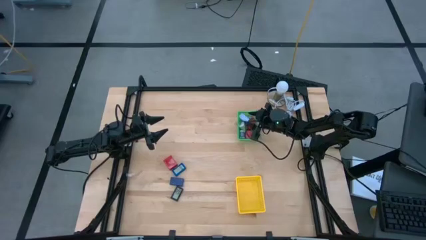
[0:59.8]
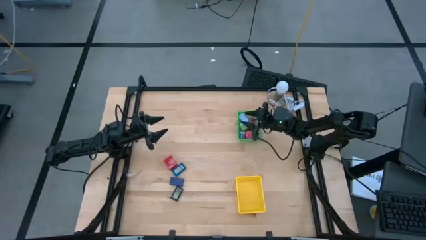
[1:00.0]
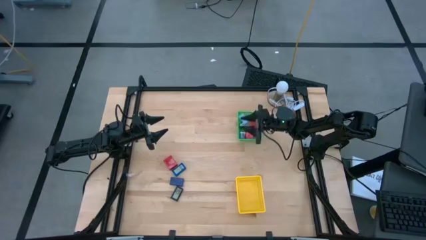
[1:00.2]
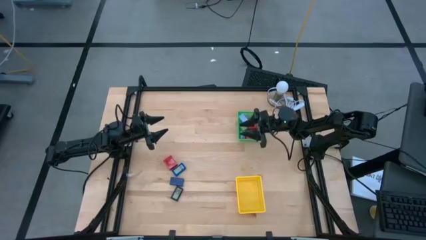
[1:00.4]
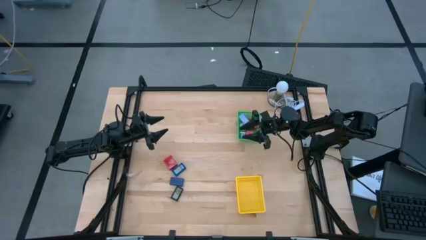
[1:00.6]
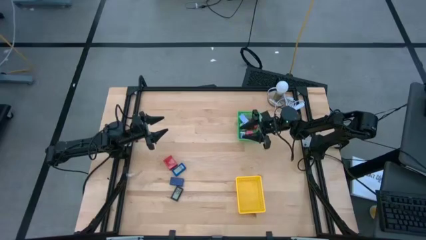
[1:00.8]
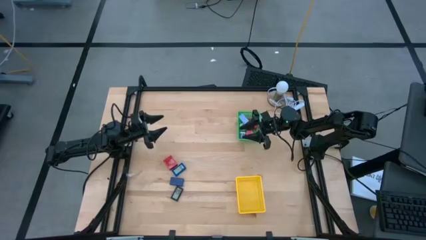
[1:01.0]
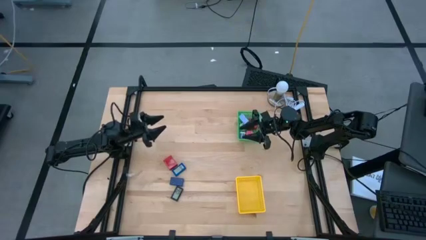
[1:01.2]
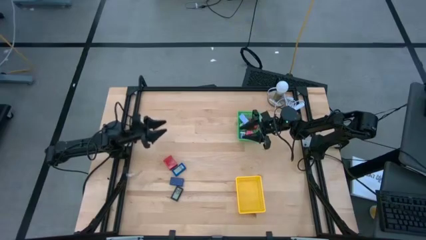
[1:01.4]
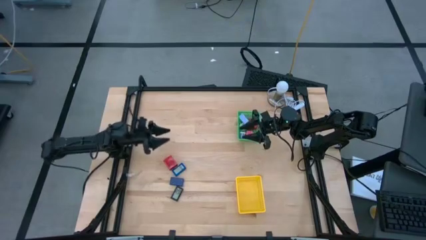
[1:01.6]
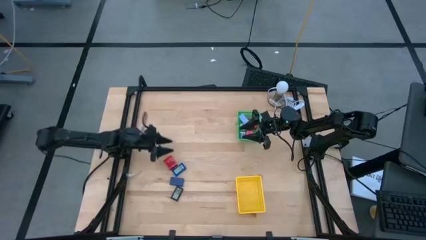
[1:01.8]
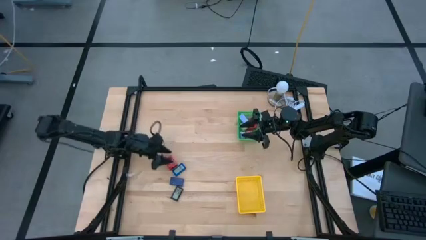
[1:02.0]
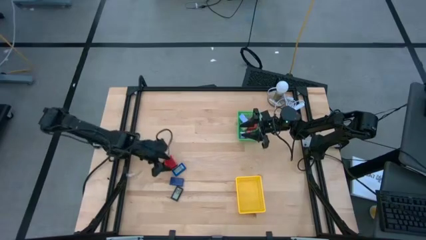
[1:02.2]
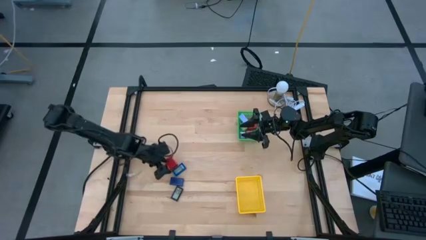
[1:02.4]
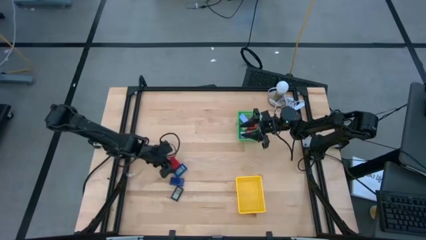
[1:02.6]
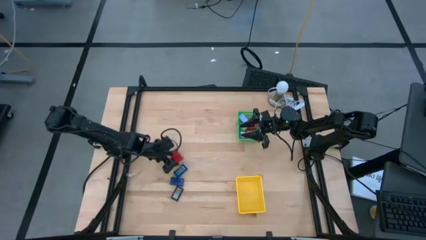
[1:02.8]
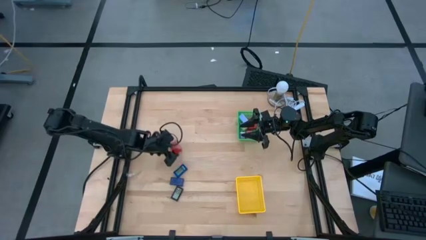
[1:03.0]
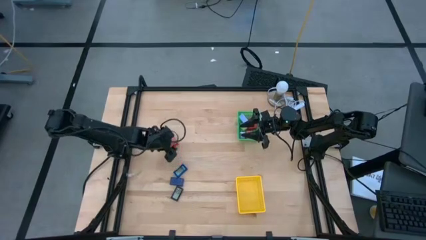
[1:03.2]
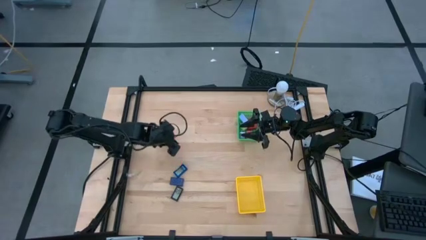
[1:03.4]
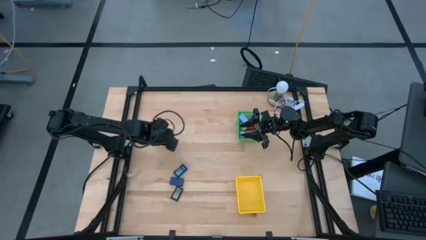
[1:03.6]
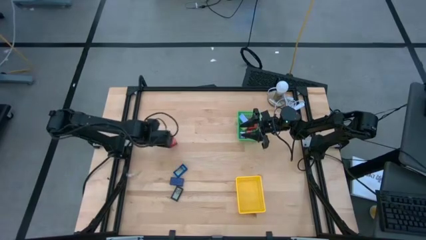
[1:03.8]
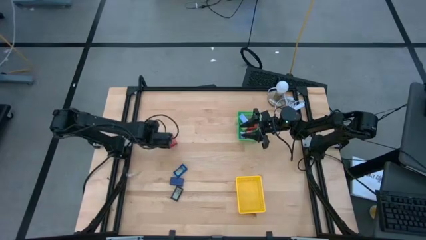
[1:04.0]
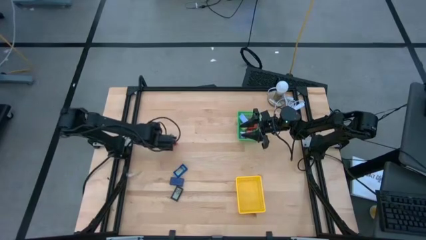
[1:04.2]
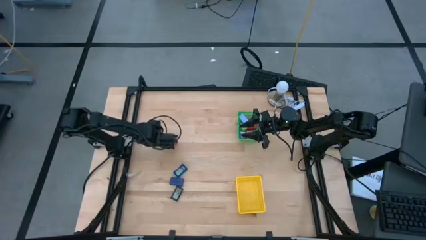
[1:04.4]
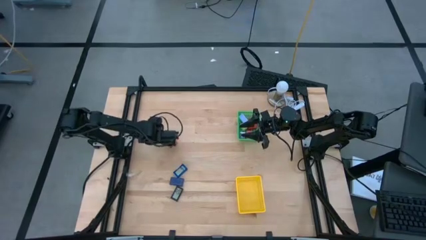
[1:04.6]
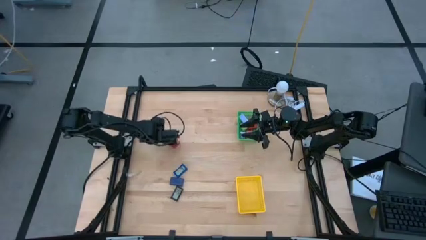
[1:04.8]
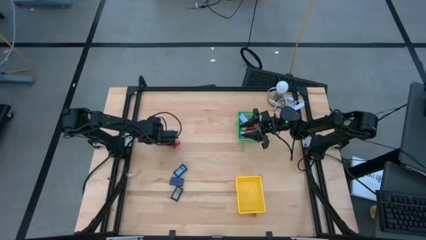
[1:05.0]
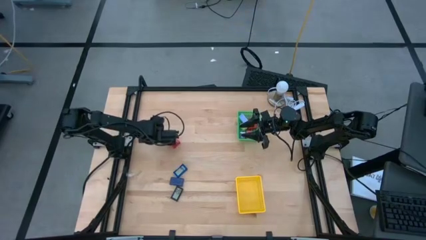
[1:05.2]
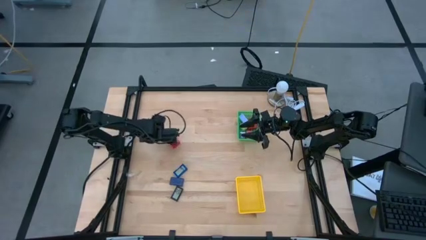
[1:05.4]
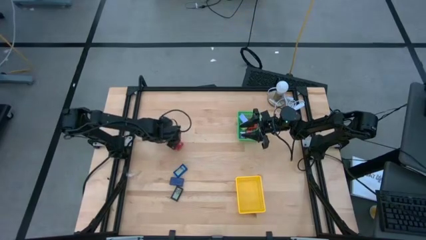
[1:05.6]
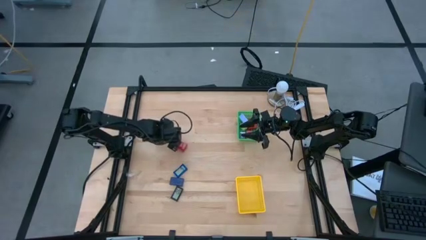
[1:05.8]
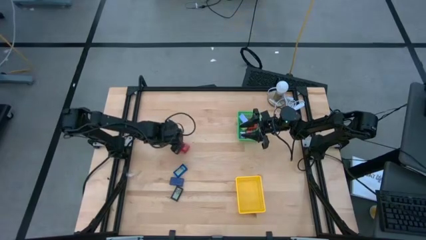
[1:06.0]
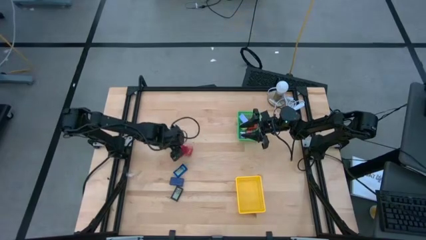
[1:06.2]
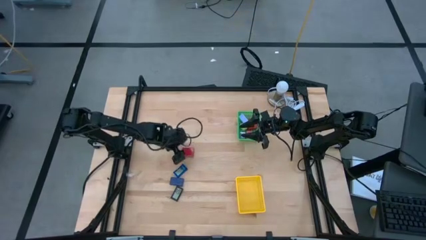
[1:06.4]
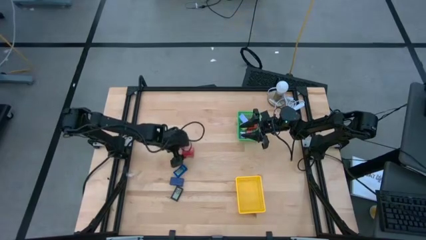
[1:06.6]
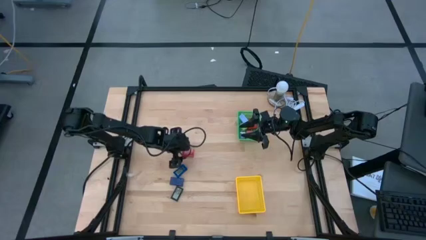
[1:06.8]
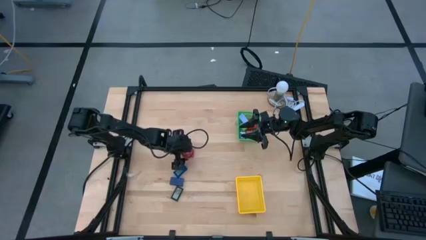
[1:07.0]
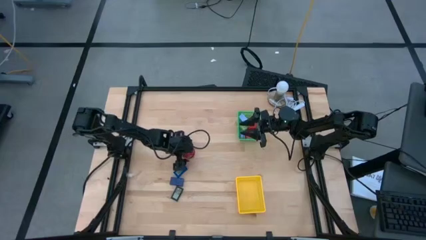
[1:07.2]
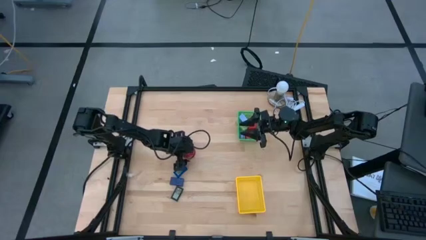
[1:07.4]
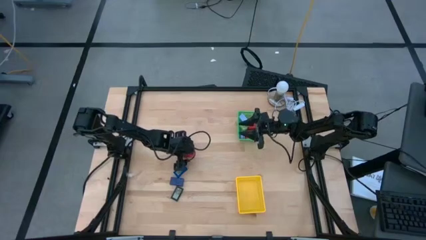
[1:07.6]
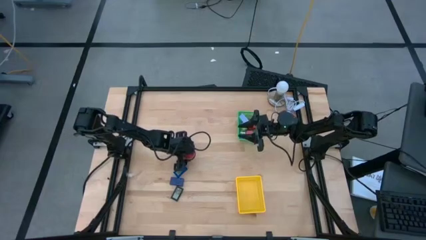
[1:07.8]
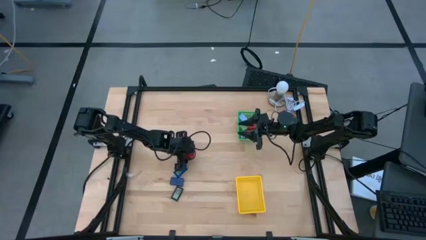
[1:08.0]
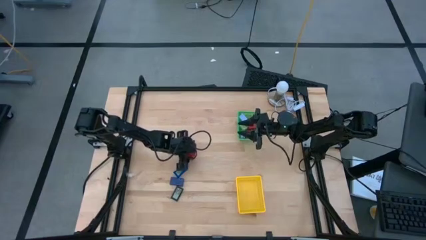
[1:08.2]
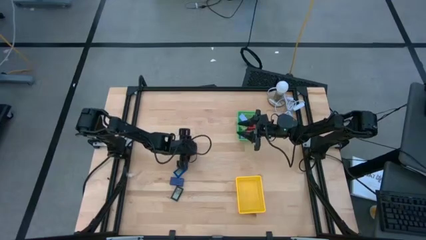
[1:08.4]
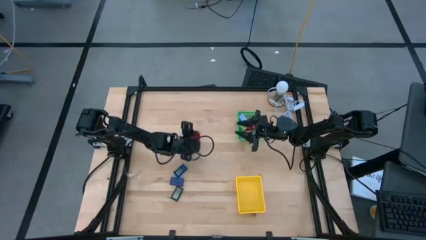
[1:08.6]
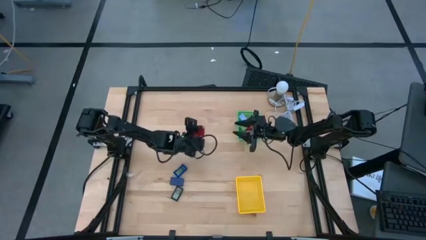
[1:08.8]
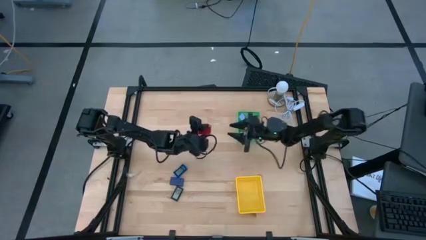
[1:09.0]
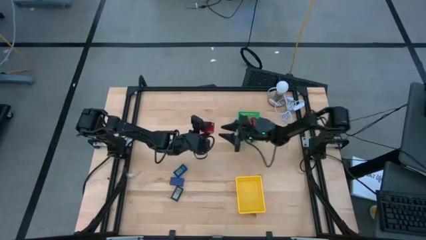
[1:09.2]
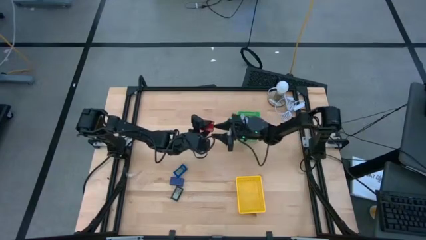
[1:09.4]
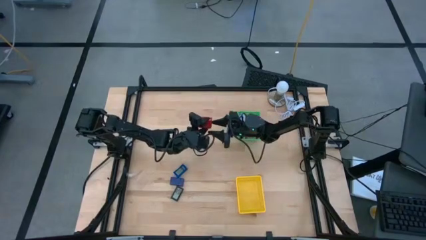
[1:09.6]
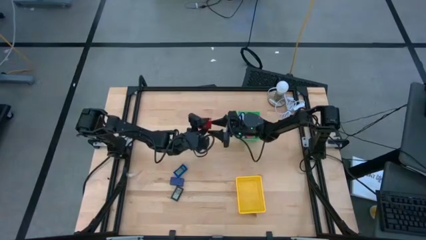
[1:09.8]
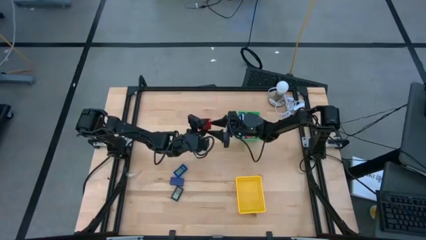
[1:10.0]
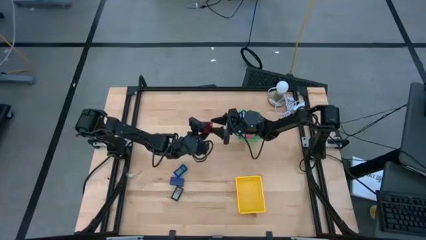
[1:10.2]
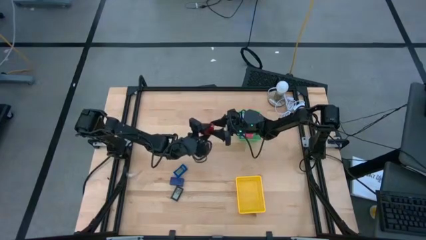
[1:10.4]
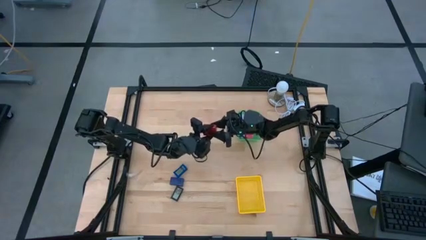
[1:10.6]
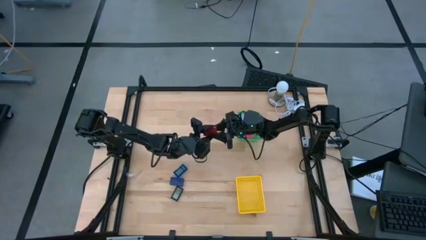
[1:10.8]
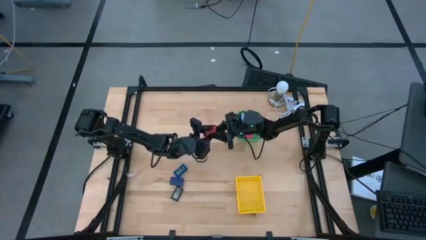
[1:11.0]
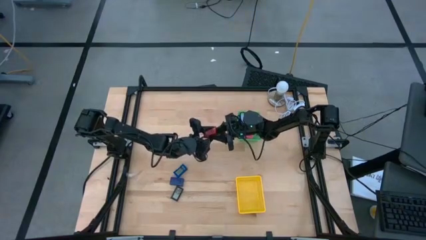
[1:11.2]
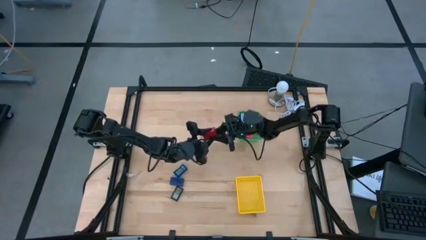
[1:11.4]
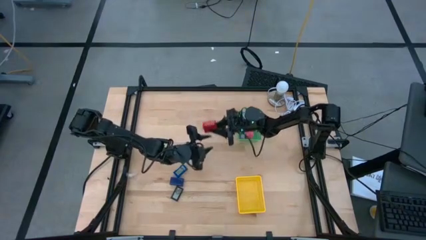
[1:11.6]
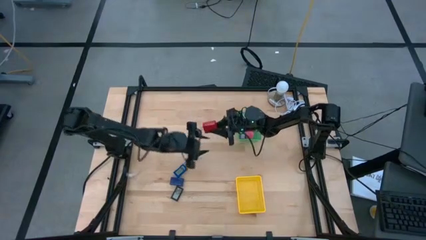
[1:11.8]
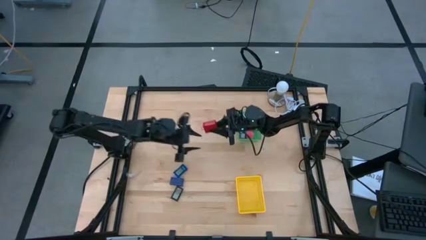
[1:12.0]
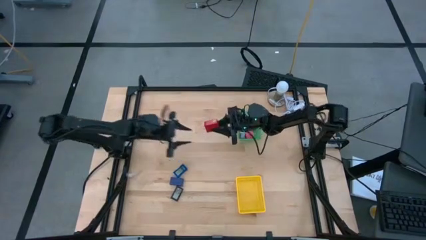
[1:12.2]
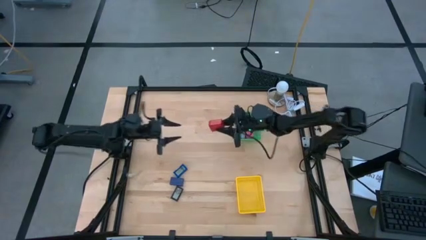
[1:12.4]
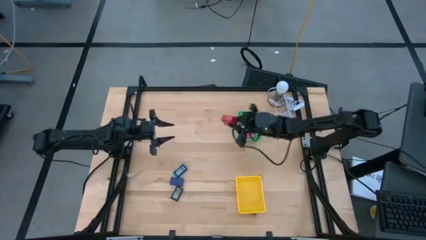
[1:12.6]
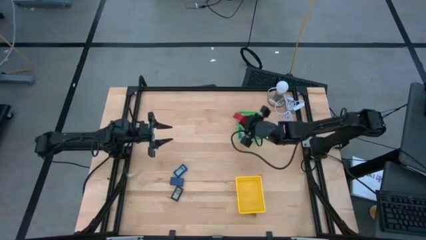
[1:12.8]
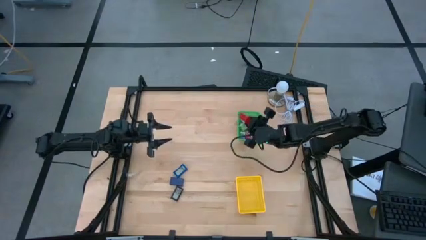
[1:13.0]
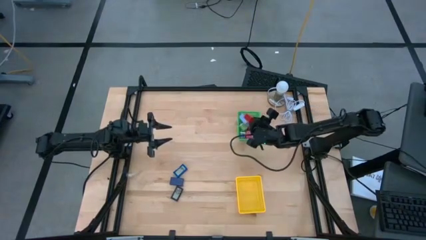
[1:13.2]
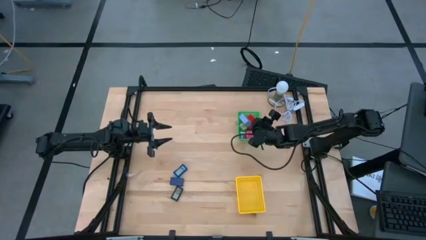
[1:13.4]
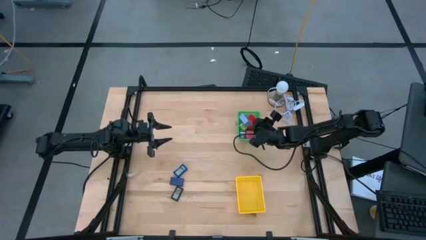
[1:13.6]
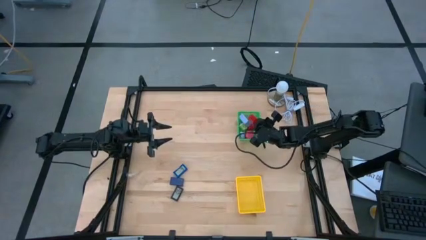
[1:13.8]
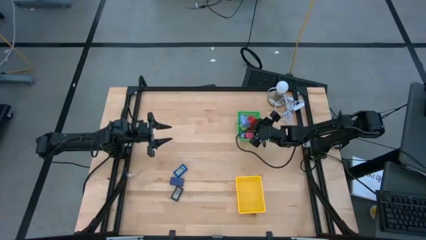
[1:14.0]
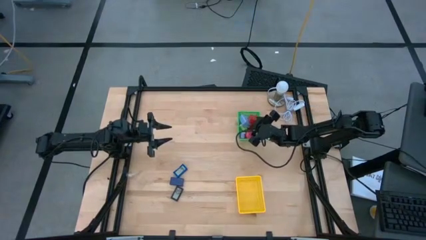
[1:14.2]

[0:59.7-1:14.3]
Task: Pick & Place Office items
Put the red charger adapter into the green bin
